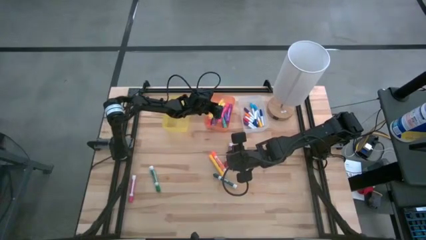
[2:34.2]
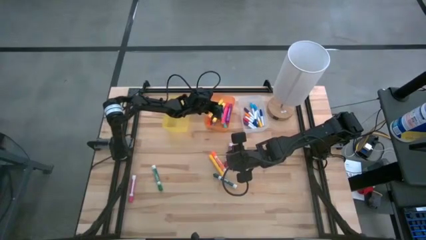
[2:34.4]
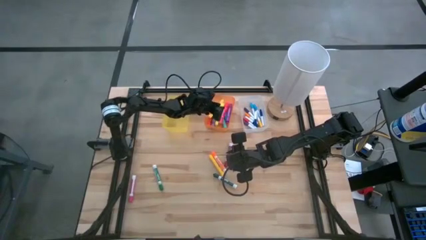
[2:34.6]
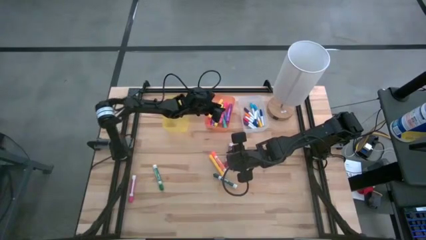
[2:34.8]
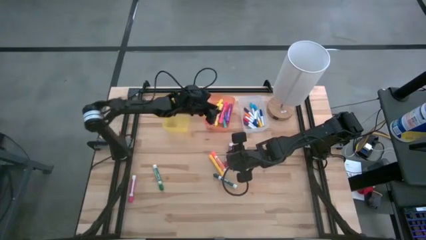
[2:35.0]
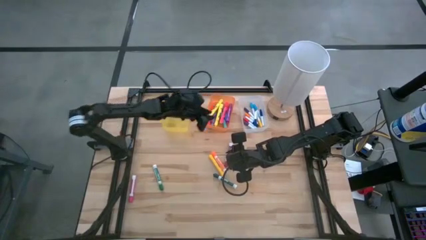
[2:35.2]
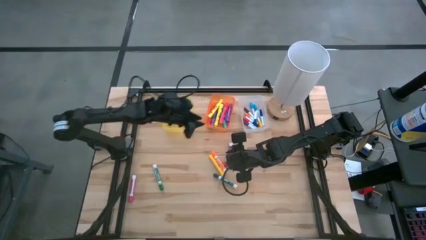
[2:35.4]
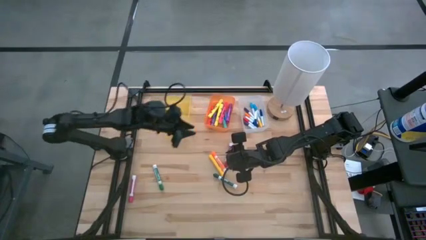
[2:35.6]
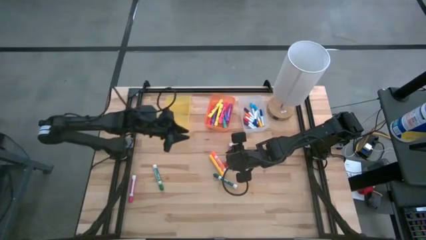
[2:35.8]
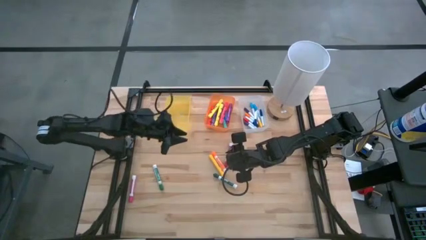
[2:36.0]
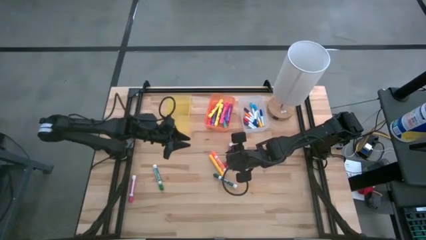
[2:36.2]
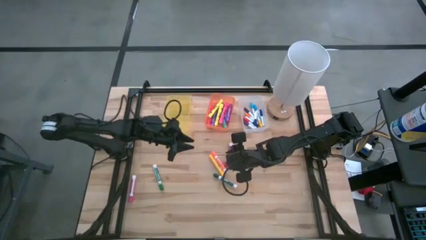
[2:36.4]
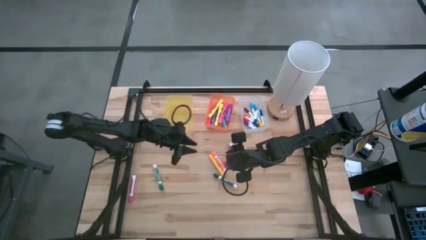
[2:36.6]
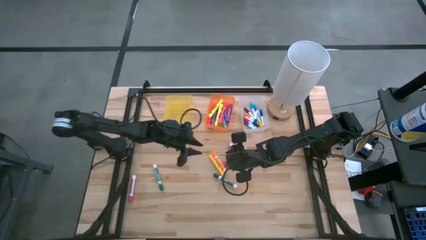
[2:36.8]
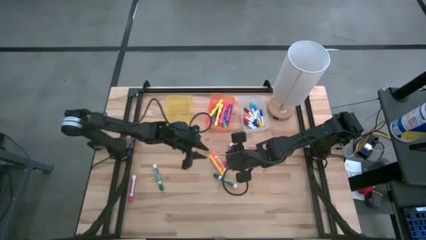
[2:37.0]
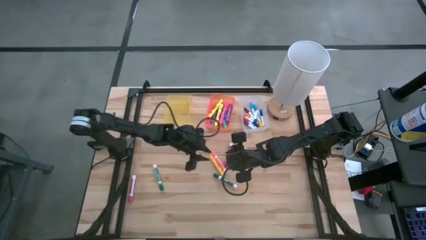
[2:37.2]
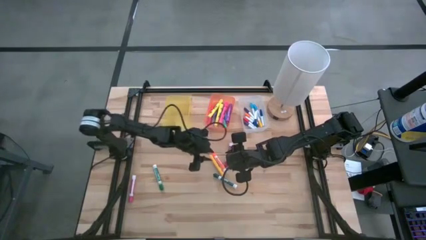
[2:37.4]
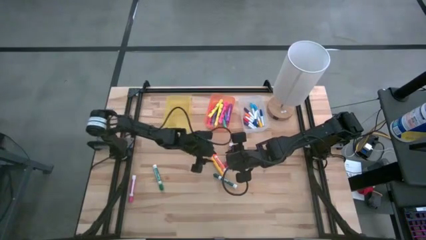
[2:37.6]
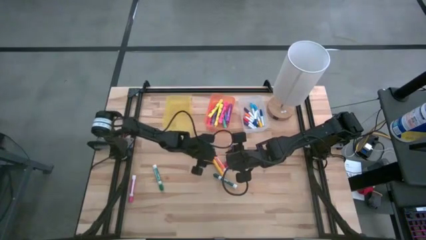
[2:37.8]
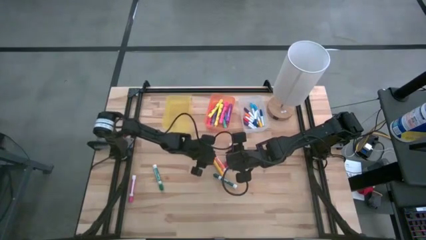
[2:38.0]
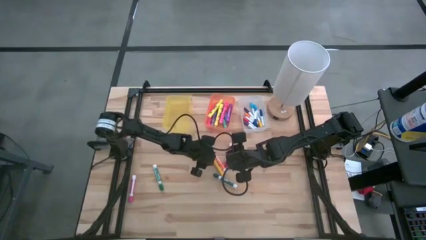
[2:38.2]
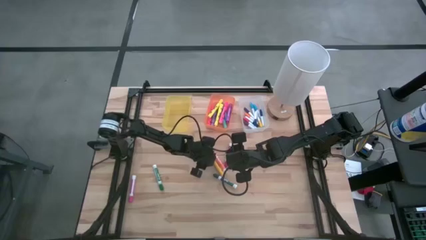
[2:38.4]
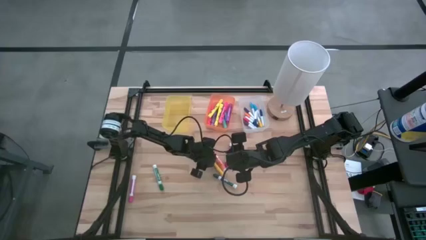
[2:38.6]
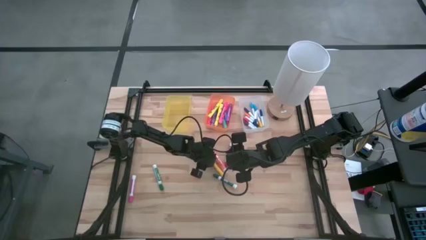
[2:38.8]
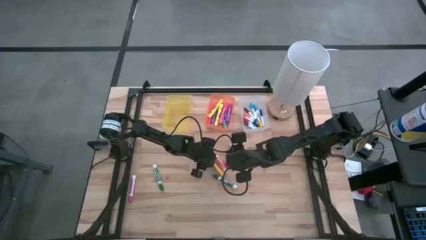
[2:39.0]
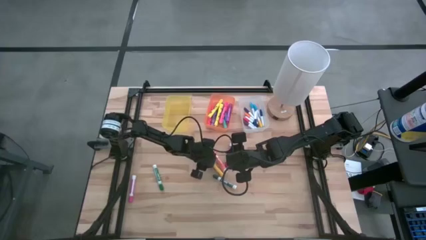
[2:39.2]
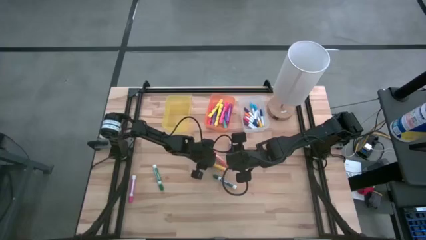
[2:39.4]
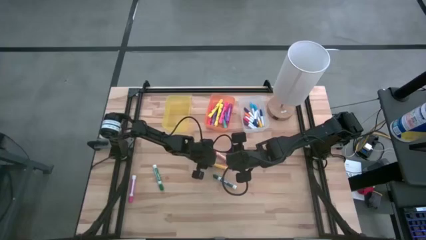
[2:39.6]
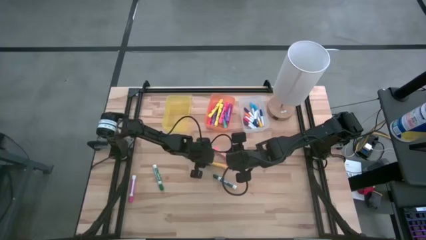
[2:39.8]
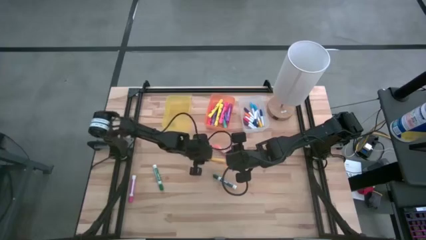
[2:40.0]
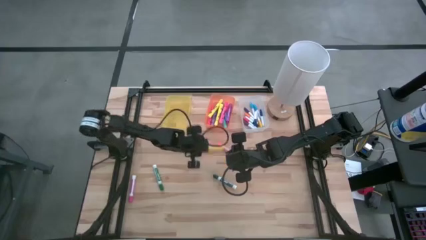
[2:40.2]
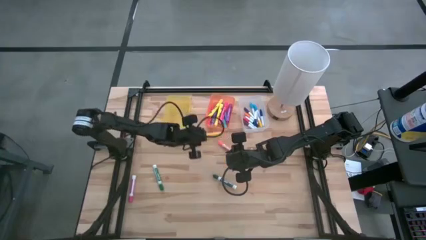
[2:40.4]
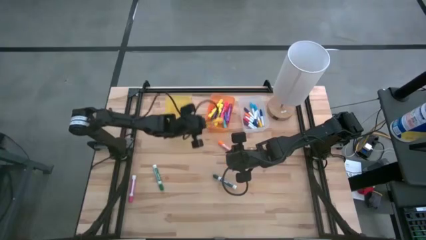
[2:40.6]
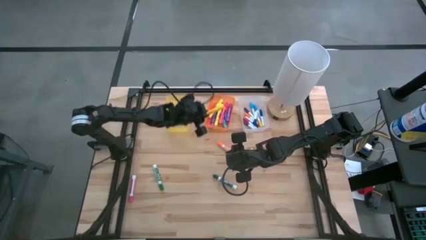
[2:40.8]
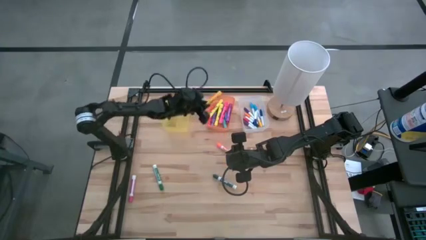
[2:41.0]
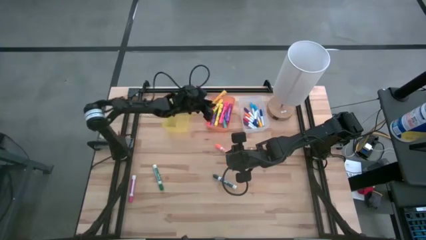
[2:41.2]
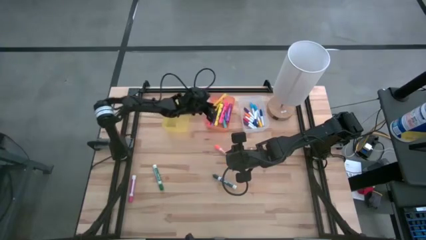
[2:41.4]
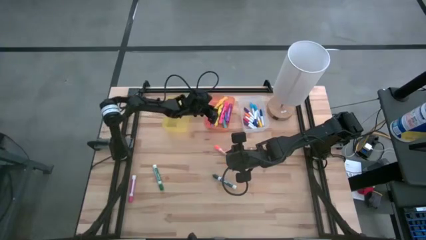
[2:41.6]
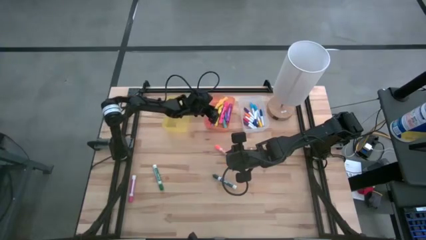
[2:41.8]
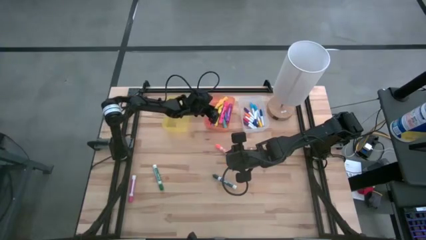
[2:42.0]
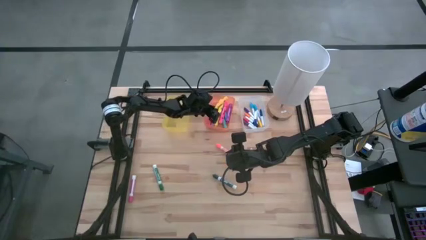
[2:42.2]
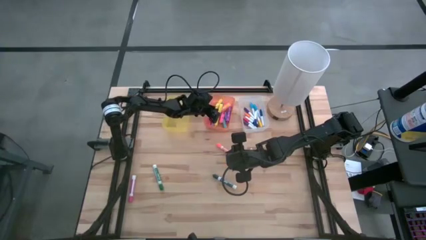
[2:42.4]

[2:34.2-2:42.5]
Task: Pick & Place Markers
Put the mustard yellow highlighter into the orange bin

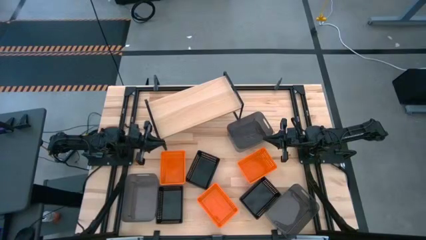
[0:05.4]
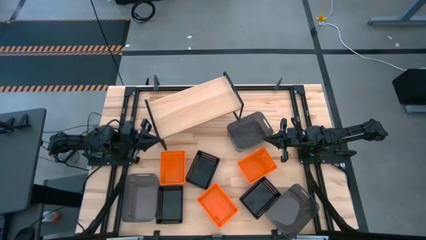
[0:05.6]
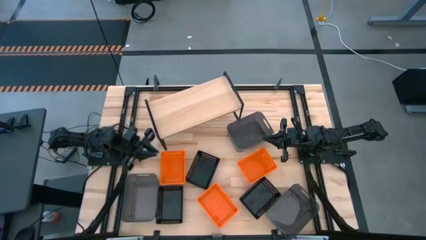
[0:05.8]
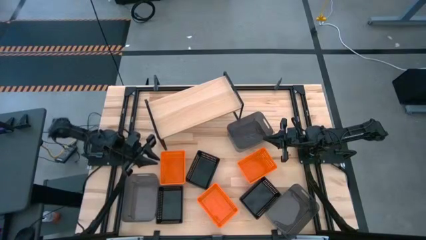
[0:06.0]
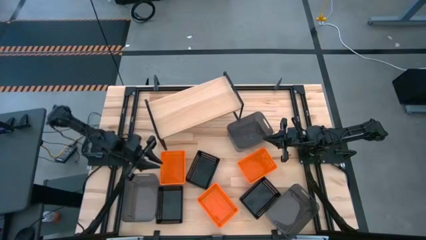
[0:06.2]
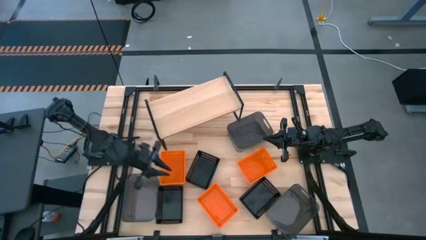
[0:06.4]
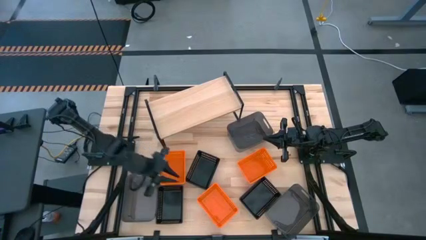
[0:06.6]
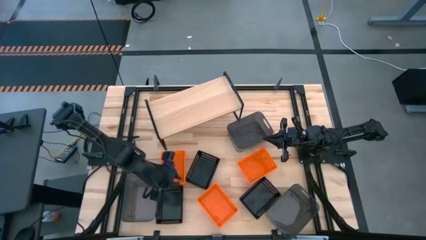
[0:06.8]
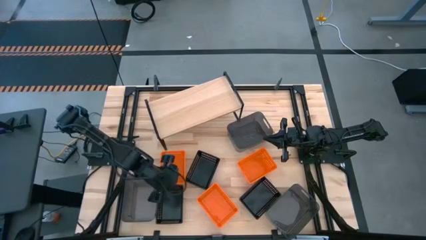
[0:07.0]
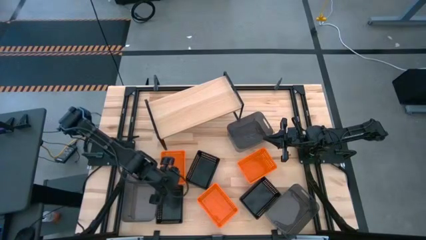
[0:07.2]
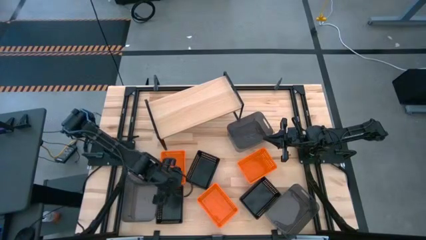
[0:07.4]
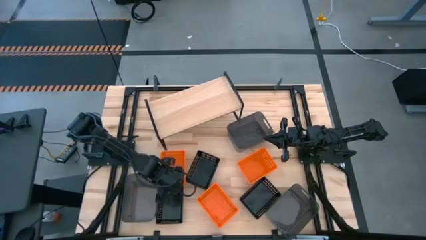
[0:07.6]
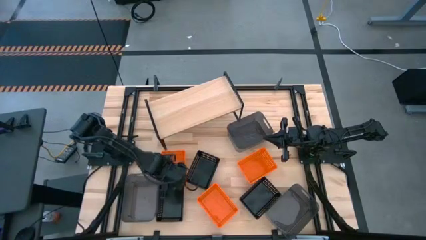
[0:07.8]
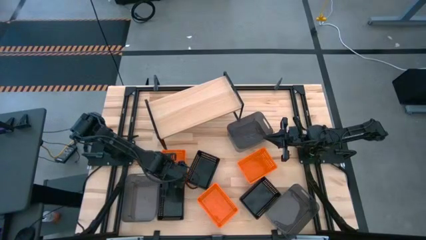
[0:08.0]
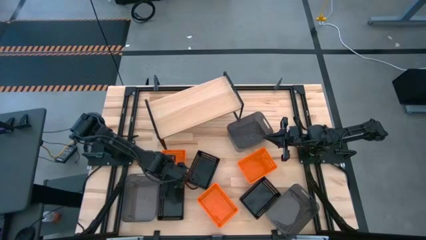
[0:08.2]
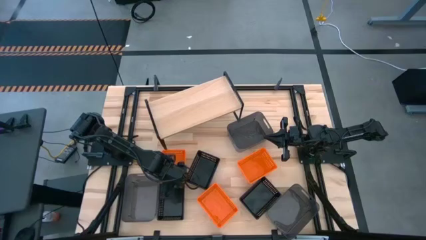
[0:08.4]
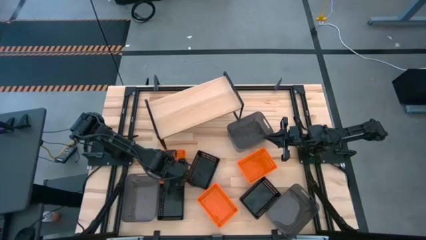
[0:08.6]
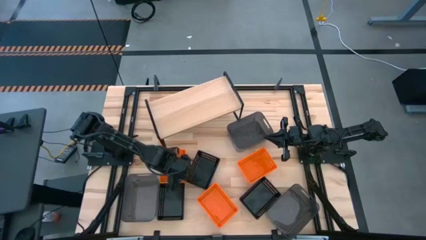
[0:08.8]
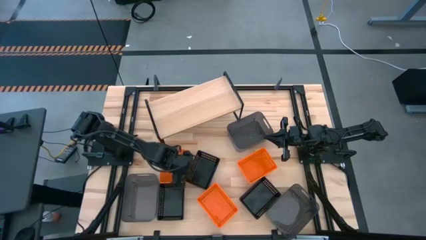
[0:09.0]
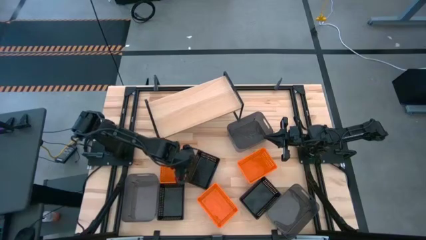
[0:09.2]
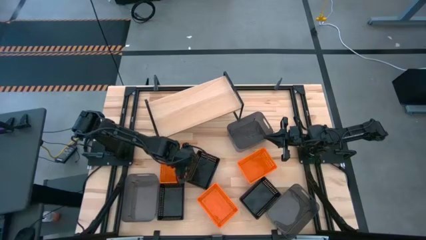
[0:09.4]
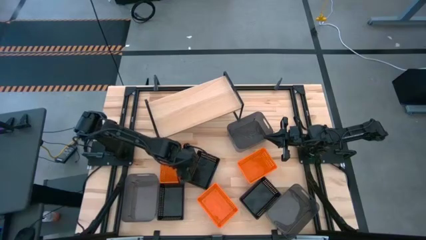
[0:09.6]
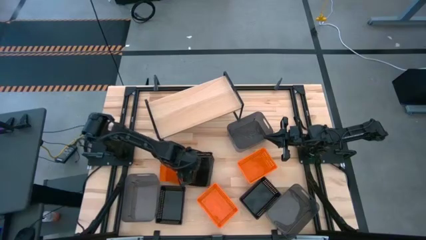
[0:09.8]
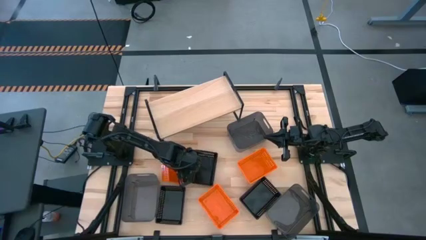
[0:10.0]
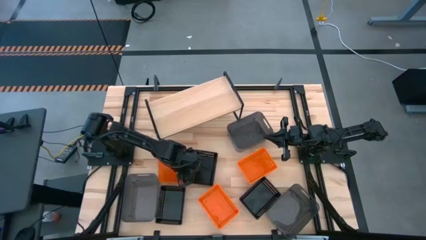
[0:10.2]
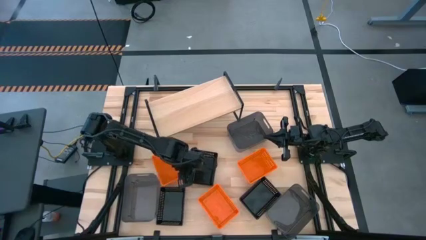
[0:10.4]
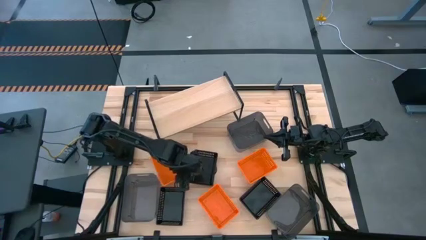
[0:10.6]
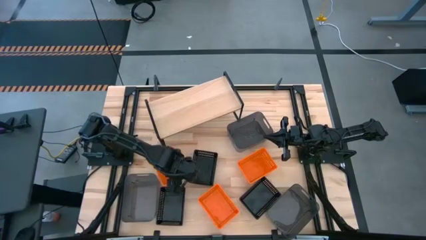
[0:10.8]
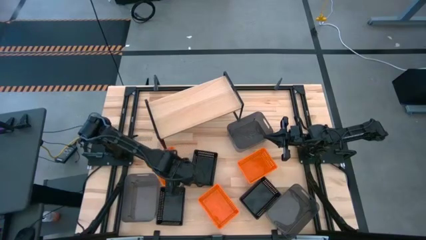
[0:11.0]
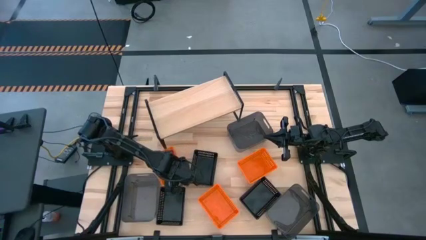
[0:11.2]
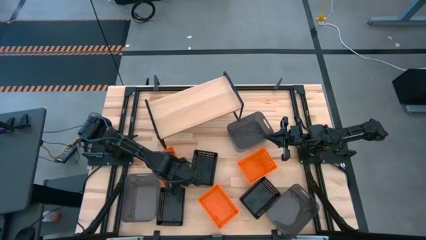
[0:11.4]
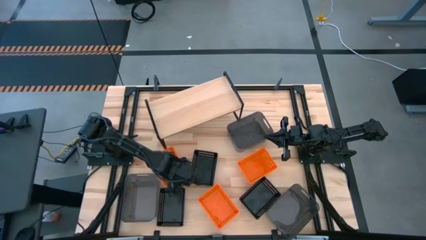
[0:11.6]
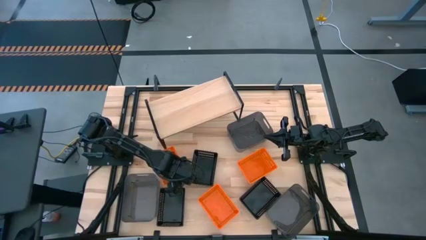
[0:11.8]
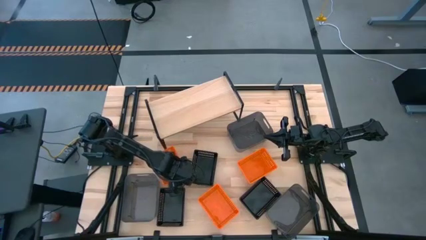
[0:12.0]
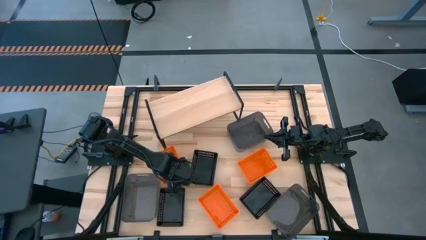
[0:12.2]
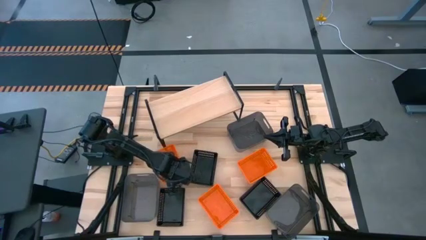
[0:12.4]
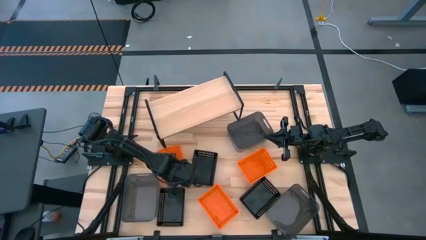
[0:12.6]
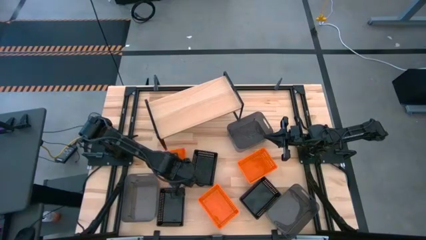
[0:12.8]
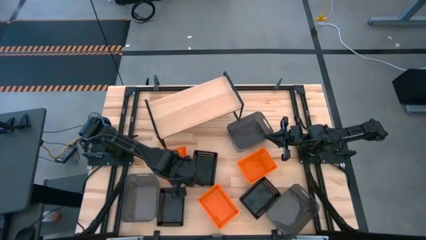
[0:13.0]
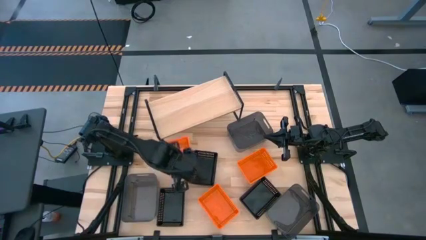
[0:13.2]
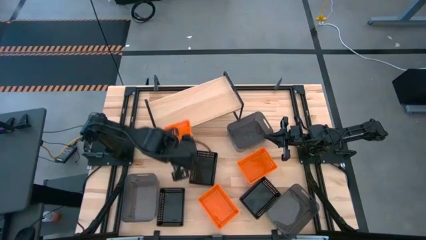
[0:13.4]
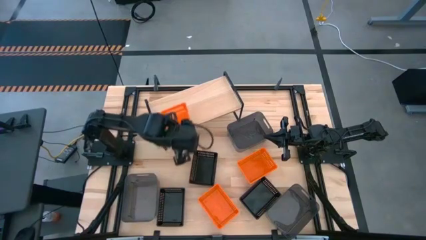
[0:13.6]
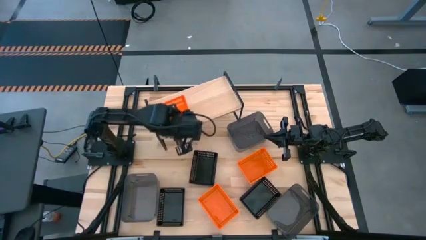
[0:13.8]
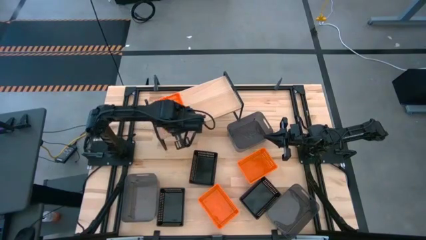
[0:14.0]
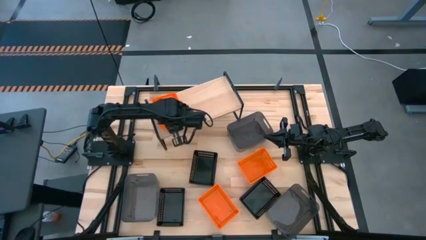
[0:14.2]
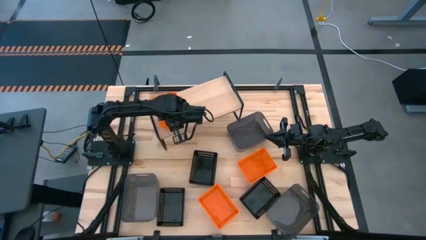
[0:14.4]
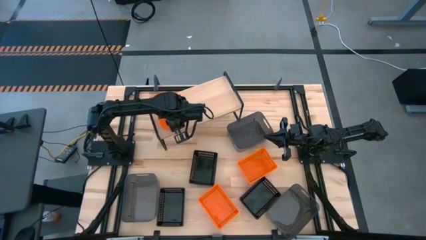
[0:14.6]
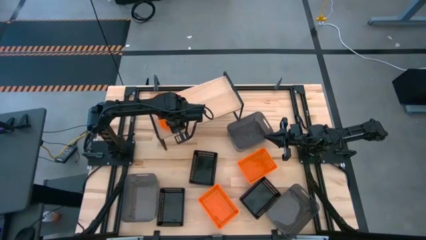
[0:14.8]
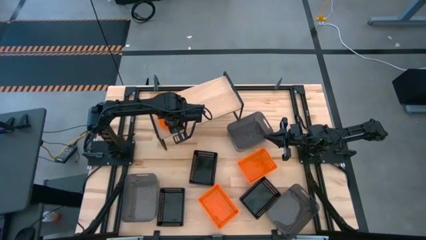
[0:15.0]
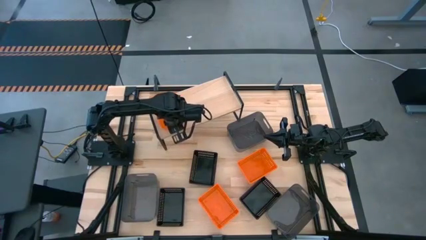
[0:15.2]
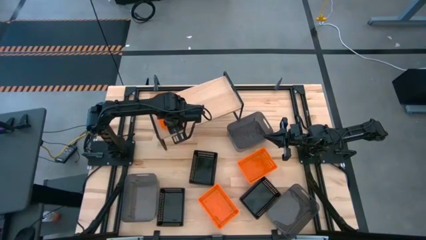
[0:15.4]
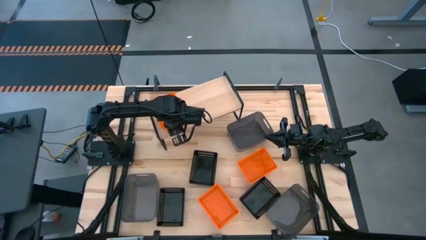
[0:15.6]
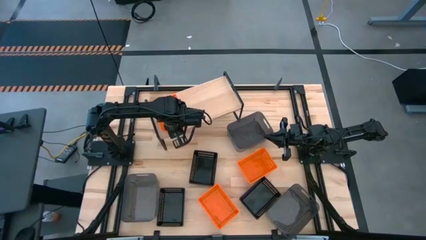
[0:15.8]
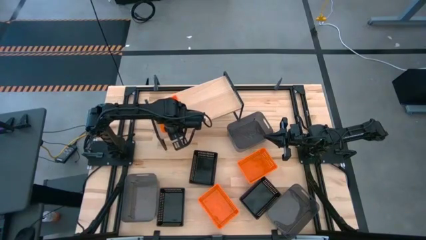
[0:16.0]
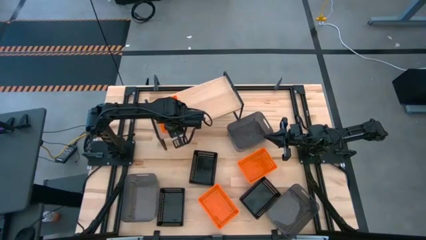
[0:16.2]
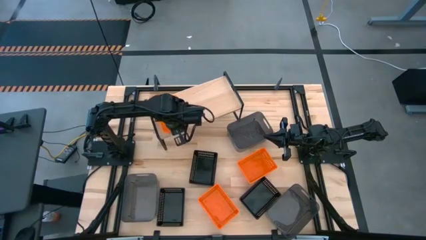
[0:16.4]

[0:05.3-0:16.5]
Task: Stack baskets on shelf by color
Put the top left orange bin on the shelf
